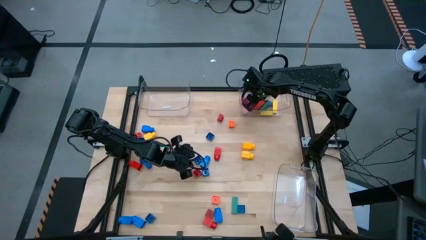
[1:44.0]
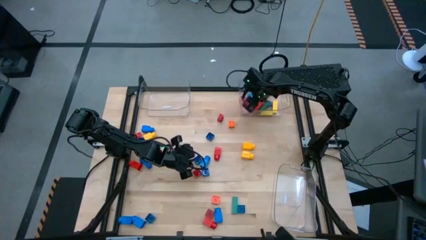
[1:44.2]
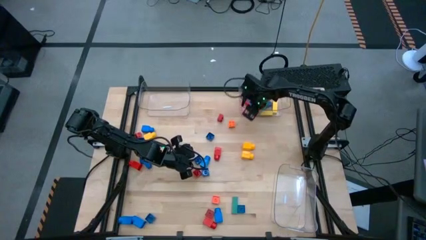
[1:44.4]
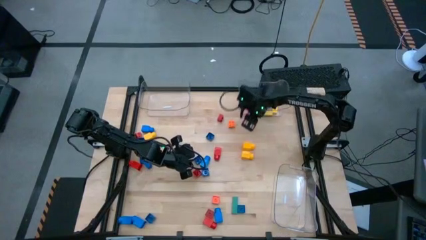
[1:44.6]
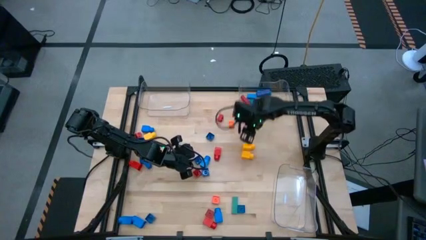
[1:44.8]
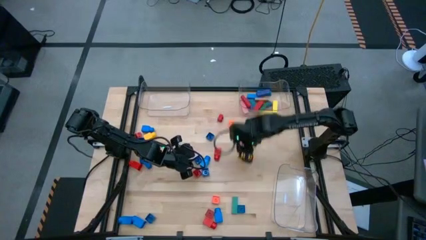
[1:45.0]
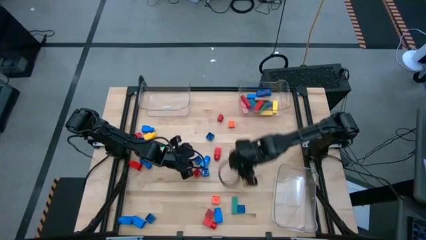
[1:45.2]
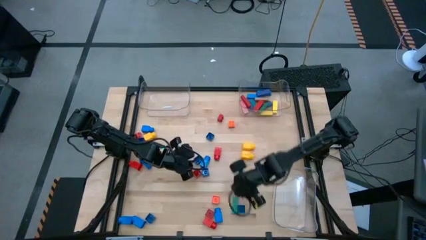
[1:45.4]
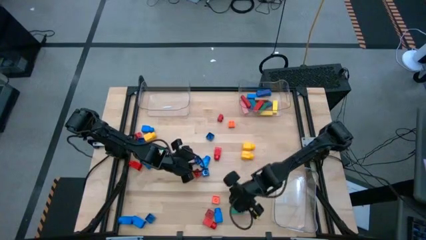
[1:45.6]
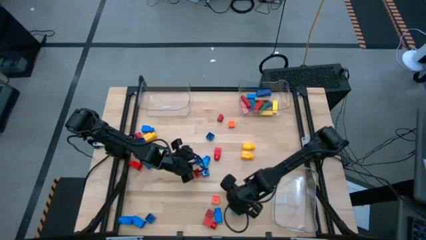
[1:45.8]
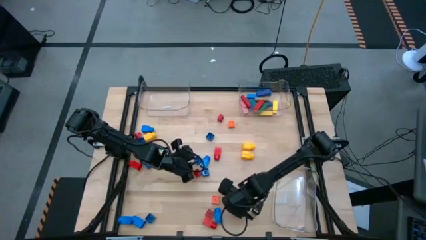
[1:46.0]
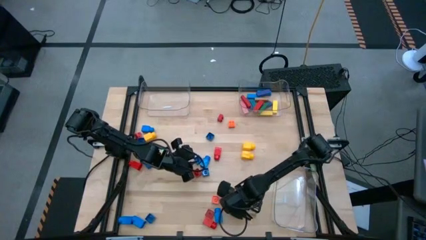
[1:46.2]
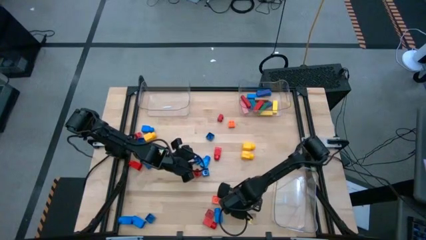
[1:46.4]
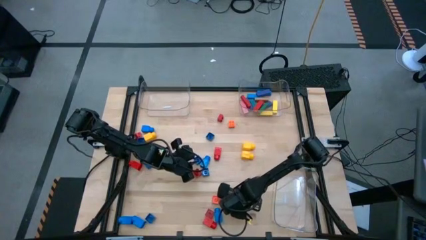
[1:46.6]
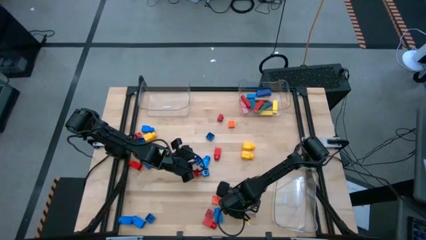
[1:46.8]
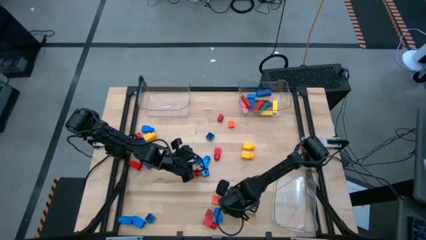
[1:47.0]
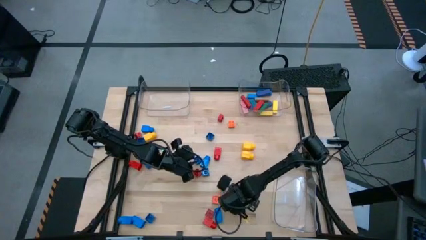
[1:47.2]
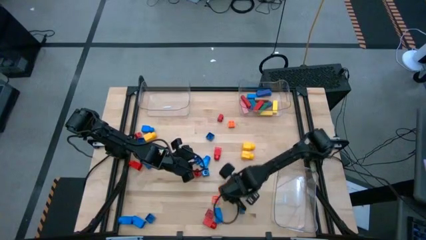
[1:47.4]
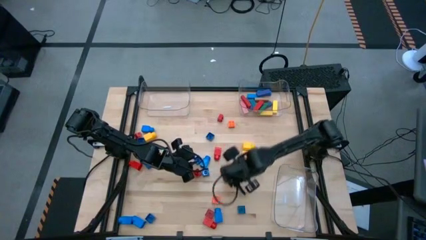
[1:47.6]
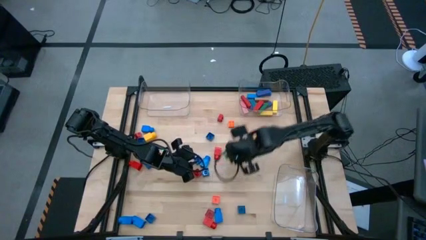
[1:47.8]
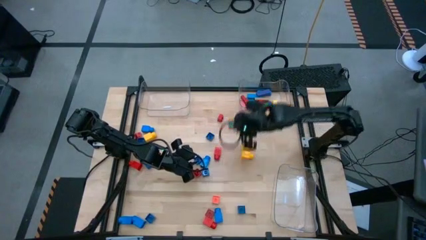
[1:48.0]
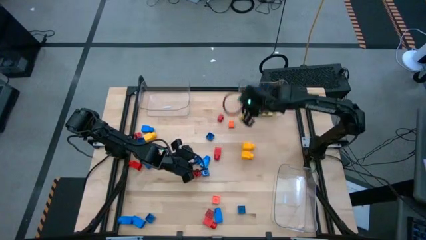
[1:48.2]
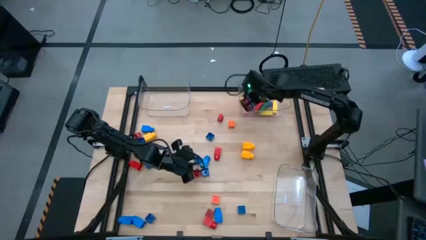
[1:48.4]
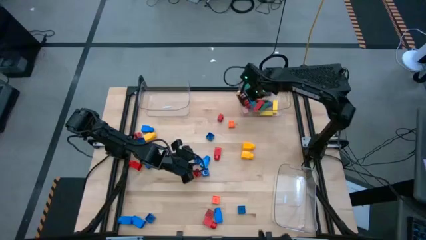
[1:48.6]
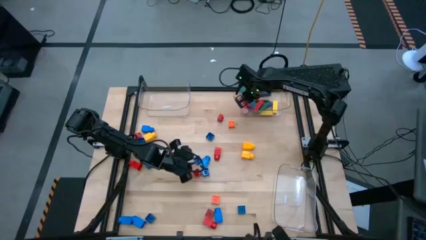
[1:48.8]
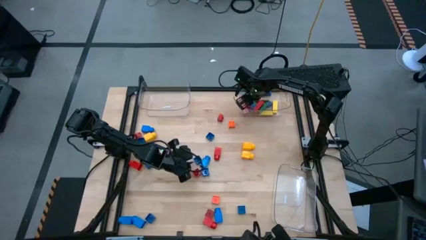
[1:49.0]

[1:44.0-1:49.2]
Task: Sort blocks by size
Put the light green block into the top right transparent bin

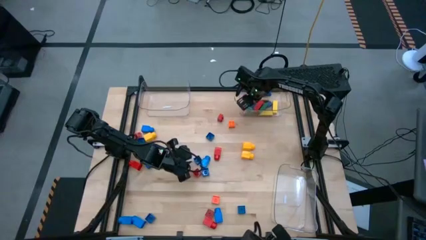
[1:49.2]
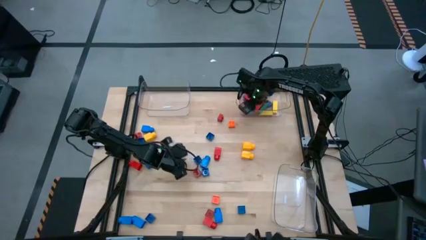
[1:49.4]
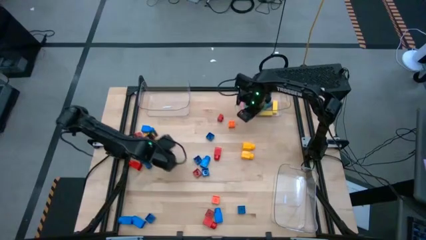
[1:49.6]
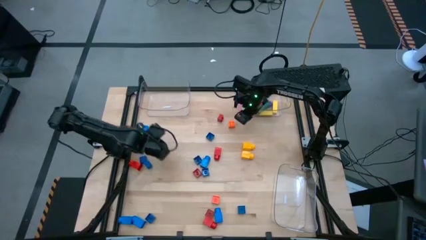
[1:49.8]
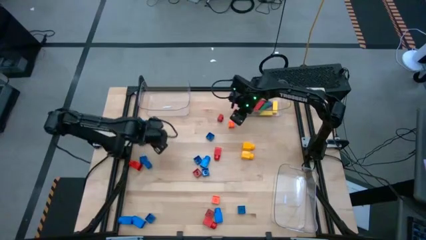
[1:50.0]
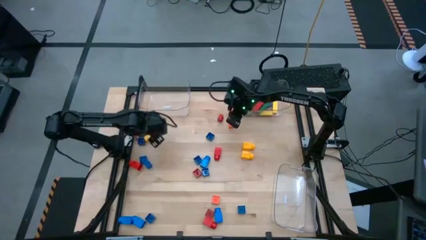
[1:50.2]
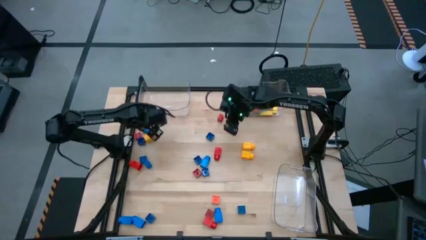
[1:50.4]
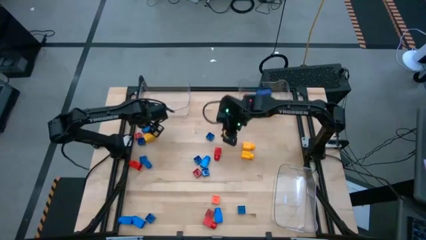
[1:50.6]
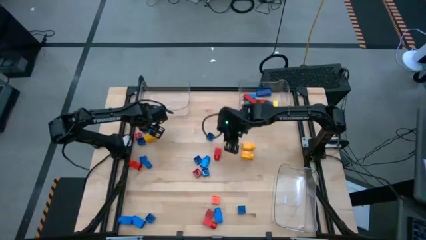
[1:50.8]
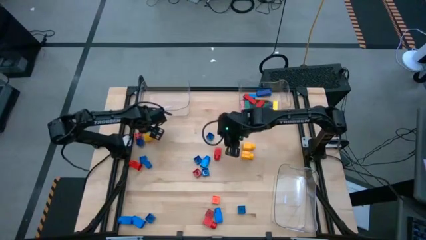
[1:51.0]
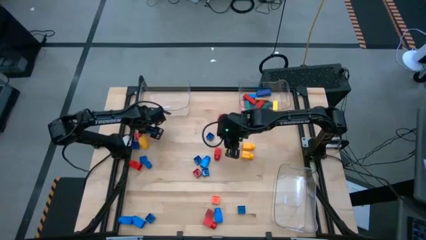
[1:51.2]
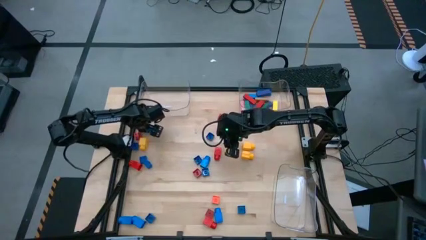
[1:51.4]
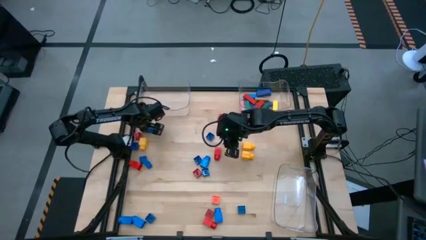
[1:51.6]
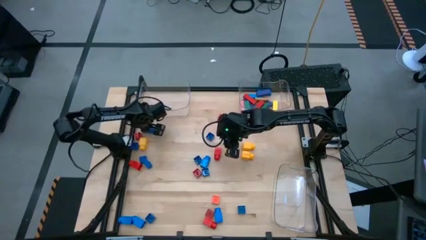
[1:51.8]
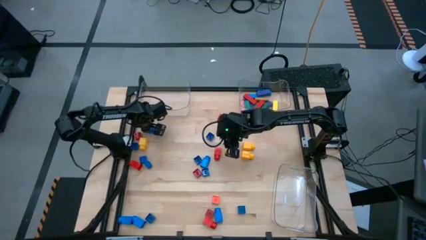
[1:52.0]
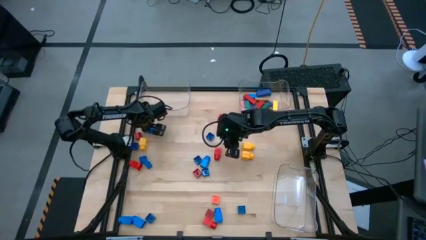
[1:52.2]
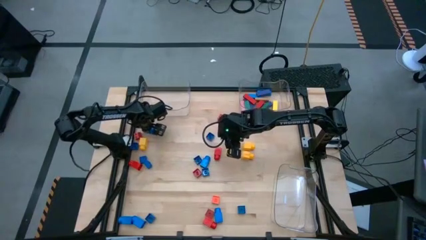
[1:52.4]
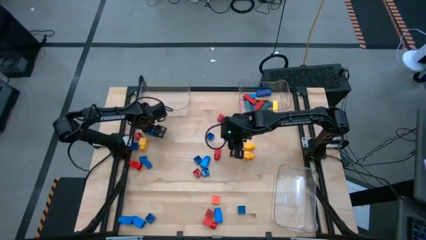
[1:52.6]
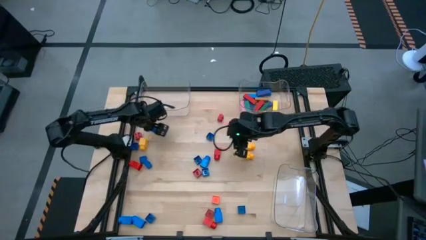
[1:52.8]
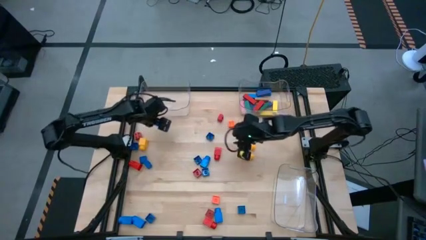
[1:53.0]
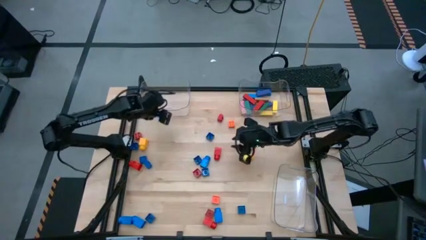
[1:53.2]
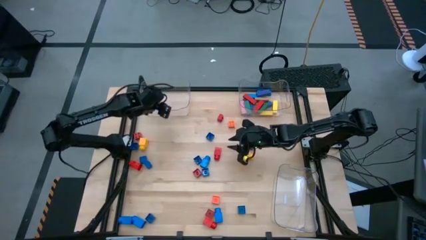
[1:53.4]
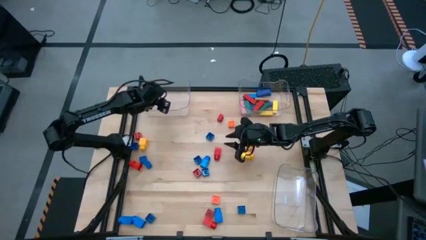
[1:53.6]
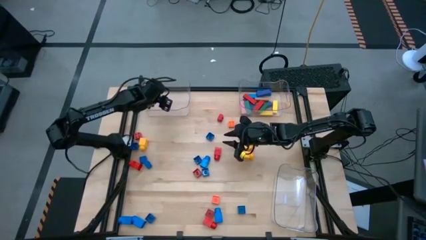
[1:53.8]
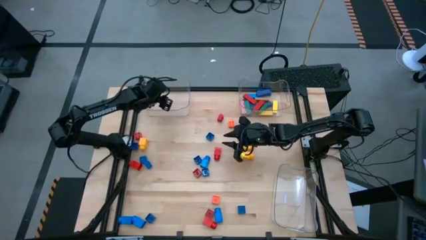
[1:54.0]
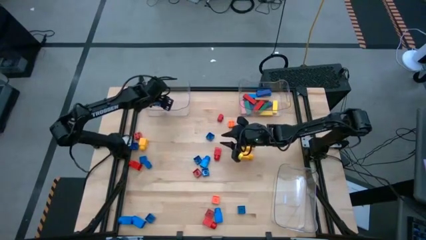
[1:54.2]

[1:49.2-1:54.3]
Put the 1 stud blue game piece into the top left transparent bin

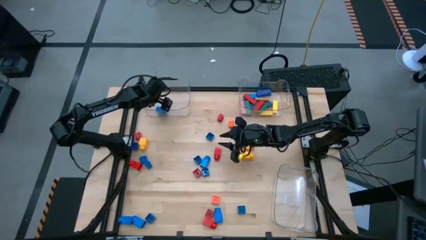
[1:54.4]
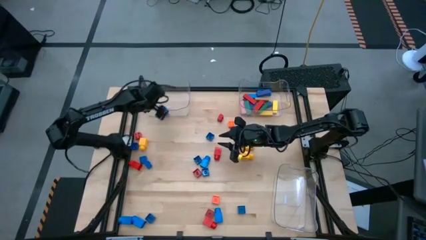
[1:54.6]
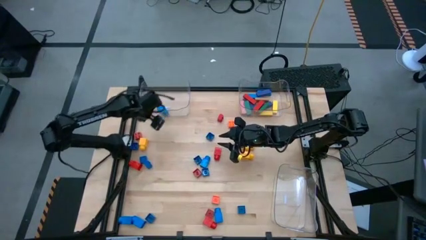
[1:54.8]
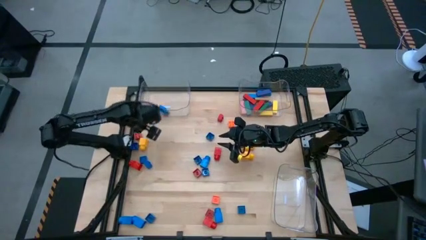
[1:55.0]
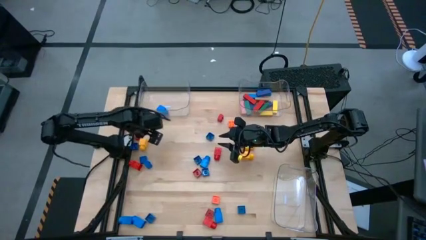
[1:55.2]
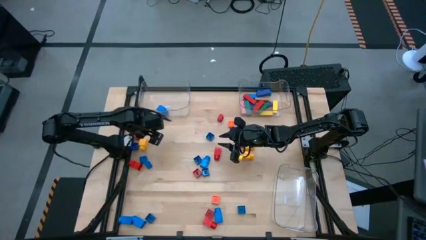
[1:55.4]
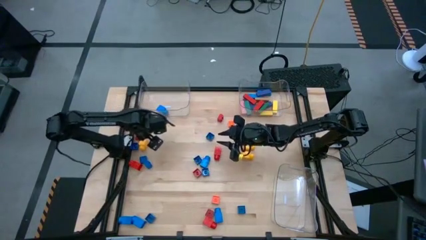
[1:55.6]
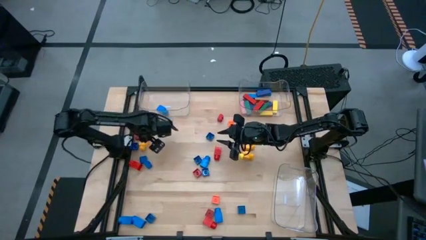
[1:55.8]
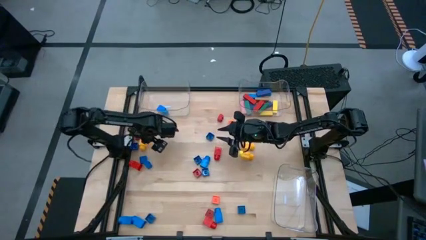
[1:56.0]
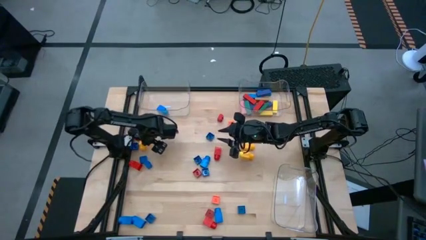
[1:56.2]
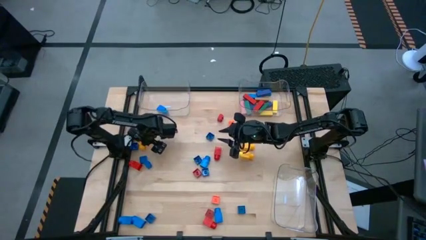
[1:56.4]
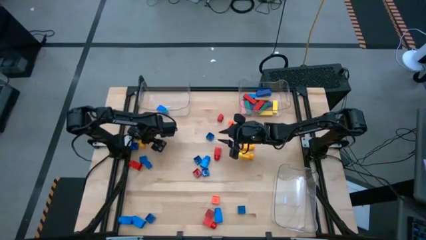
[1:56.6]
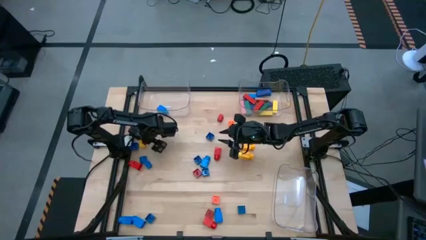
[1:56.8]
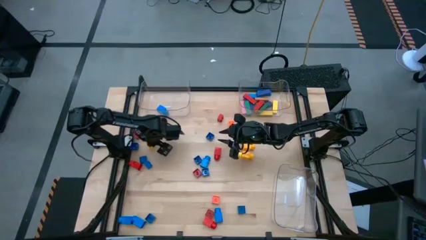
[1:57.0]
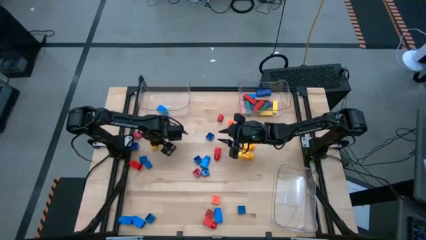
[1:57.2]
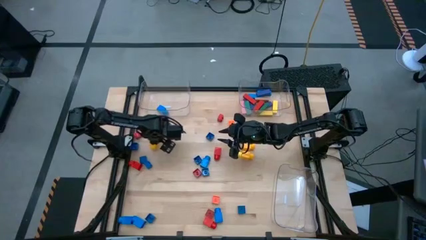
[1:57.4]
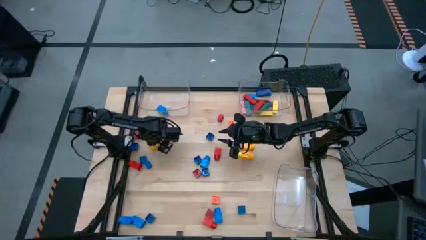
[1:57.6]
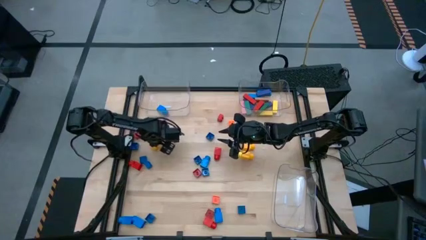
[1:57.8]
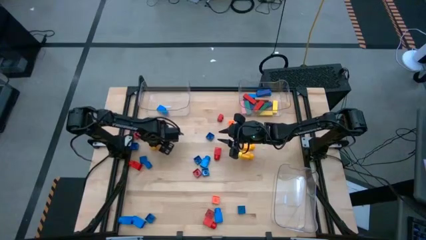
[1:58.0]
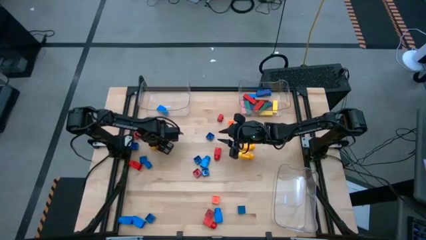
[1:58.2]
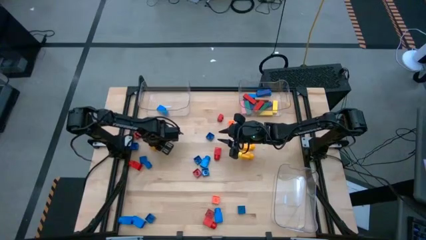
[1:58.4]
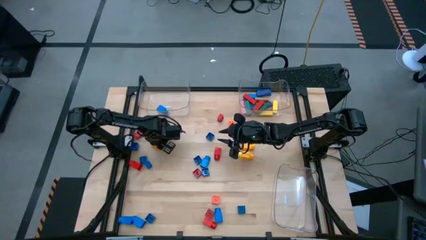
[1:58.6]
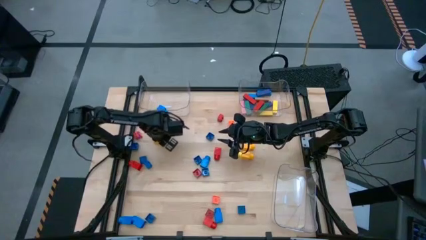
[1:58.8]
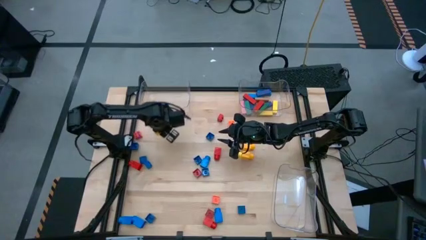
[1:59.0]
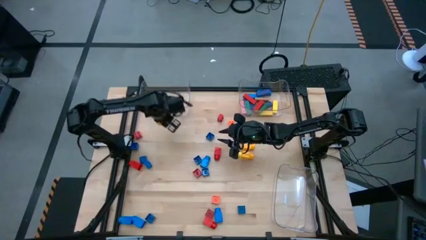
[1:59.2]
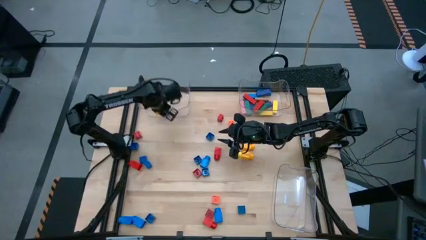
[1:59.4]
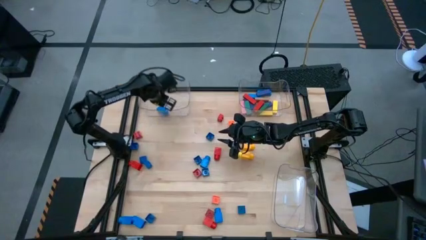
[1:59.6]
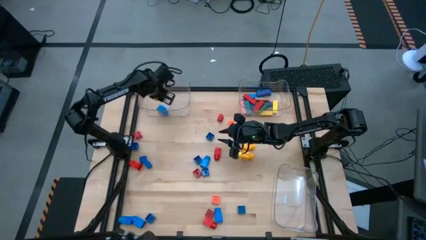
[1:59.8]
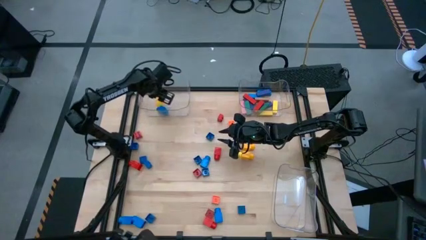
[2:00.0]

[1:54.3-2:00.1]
Put the 1 stud yellow game piece into the top left transparent bin

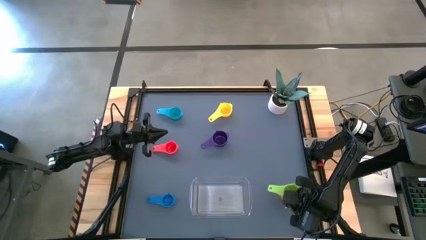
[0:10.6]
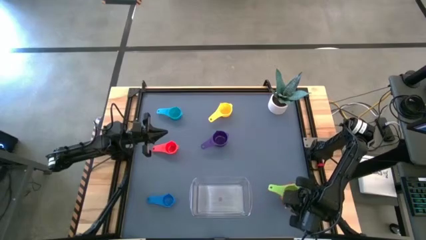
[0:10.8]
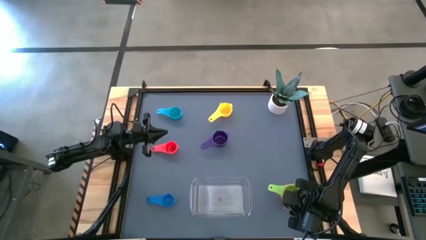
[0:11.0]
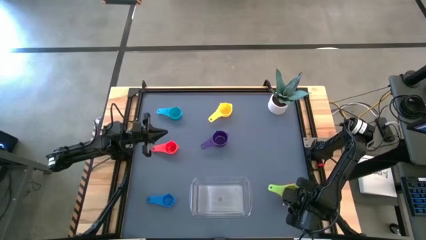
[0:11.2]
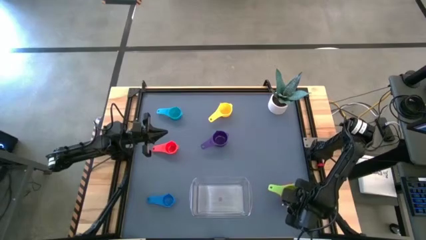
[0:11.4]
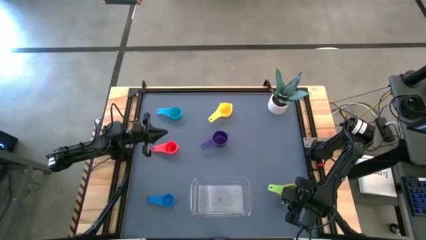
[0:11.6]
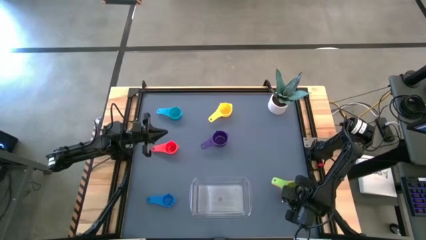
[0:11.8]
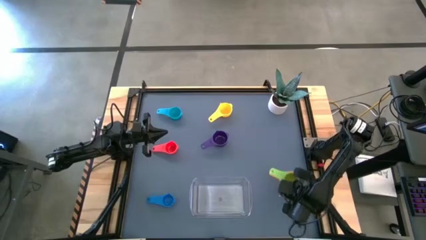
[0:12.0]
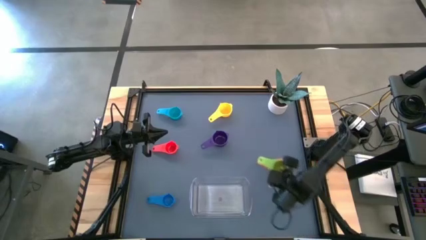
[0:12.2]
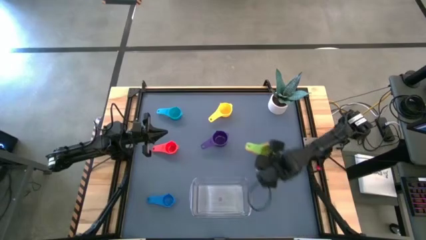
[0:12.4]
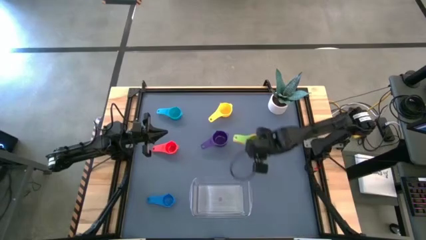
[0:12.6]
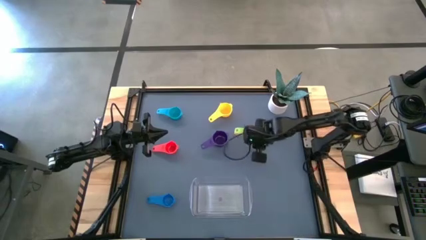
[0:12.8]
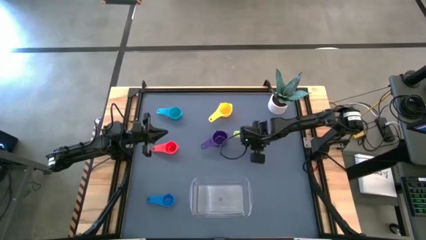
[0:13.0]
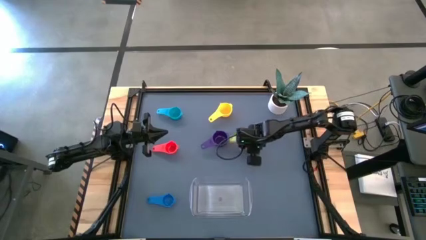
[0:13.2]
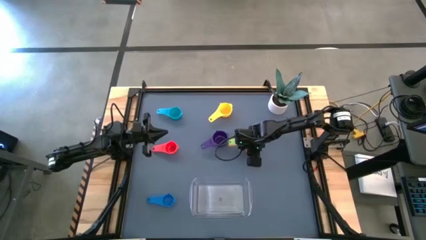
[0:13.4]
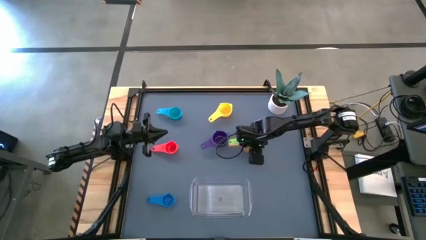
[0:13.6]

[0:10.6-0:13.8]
Task: Nest measuring cups in basket
Move the stacked measuring cups to the center of the table
